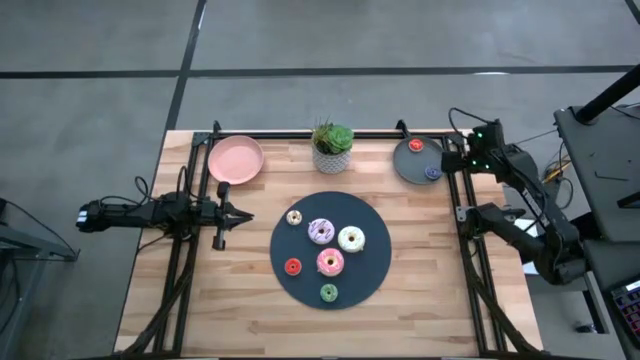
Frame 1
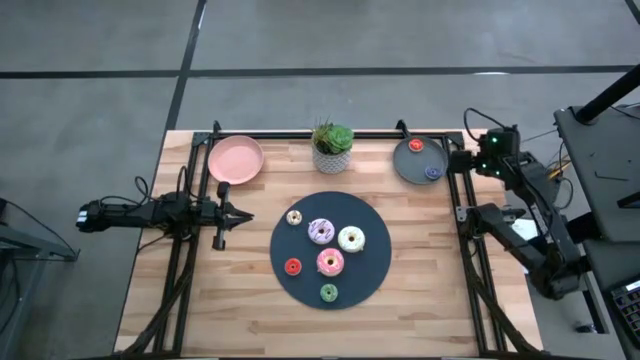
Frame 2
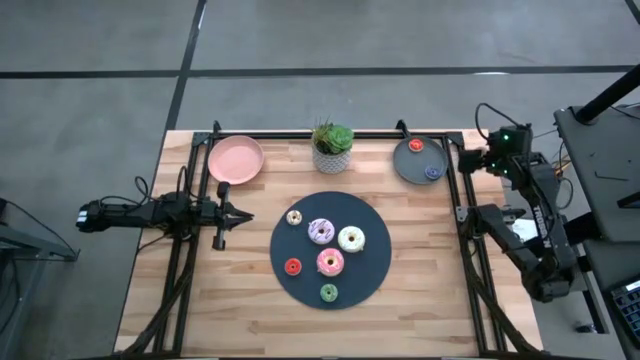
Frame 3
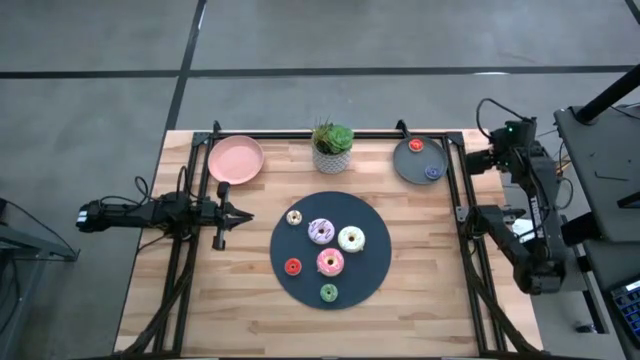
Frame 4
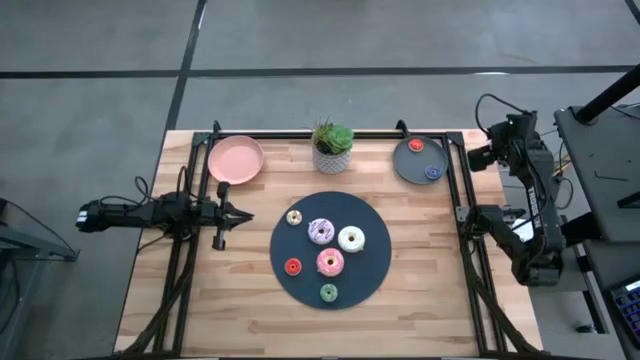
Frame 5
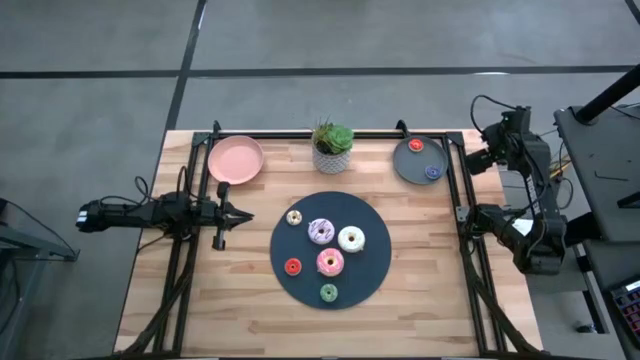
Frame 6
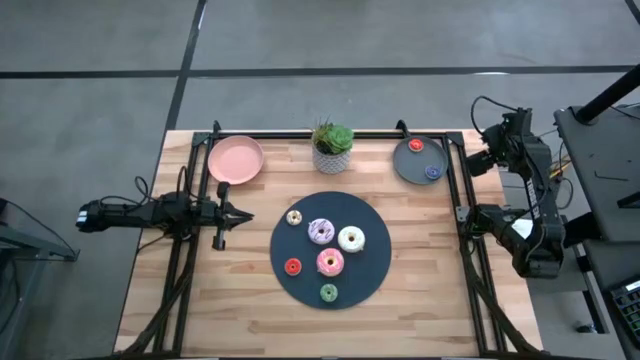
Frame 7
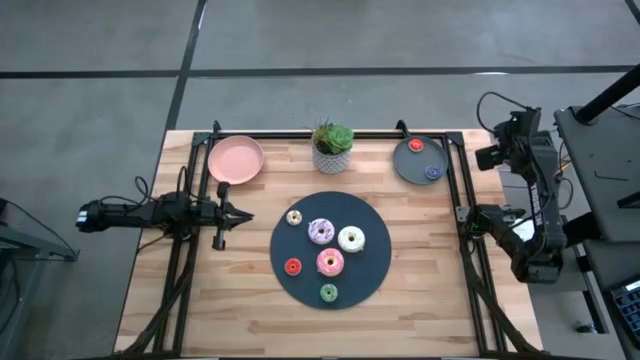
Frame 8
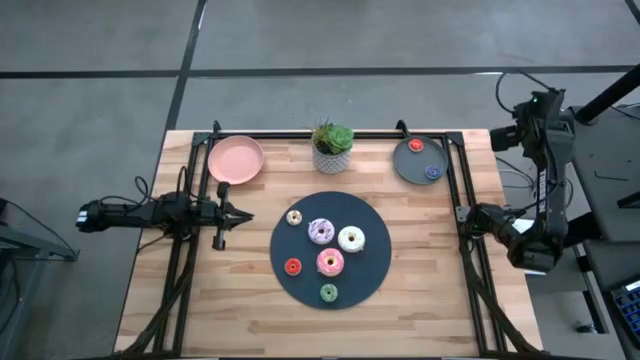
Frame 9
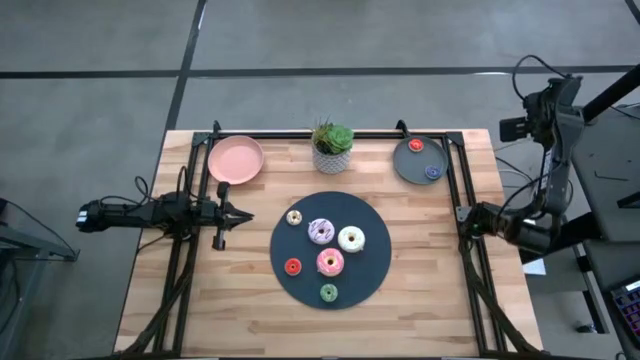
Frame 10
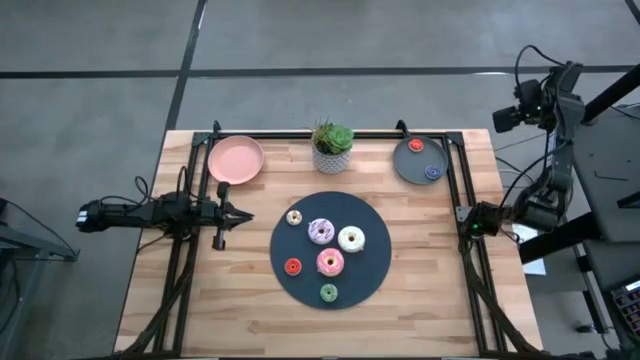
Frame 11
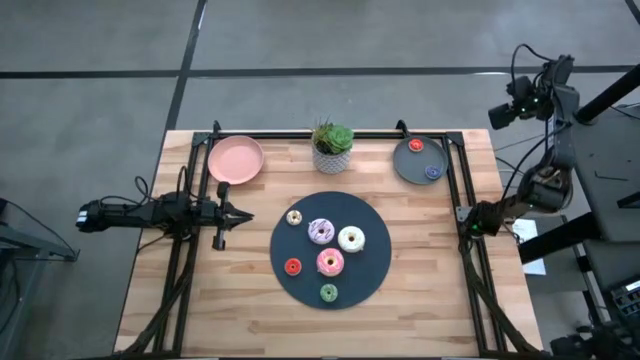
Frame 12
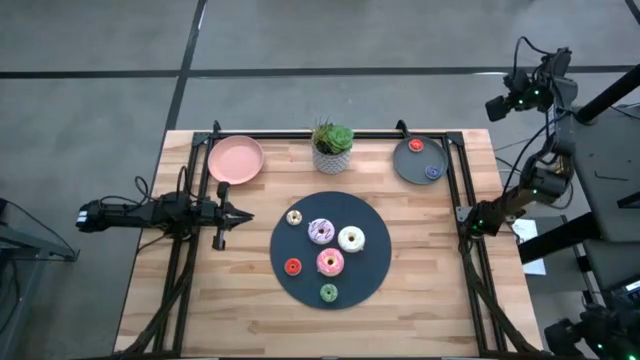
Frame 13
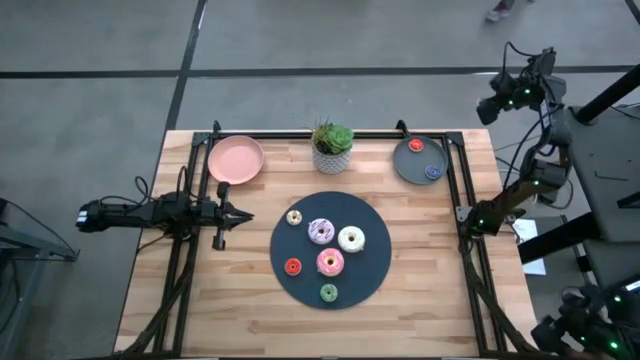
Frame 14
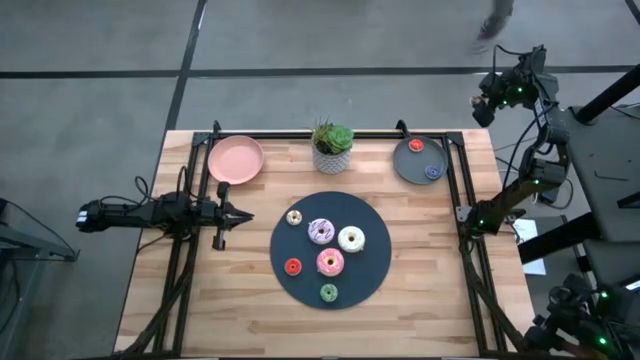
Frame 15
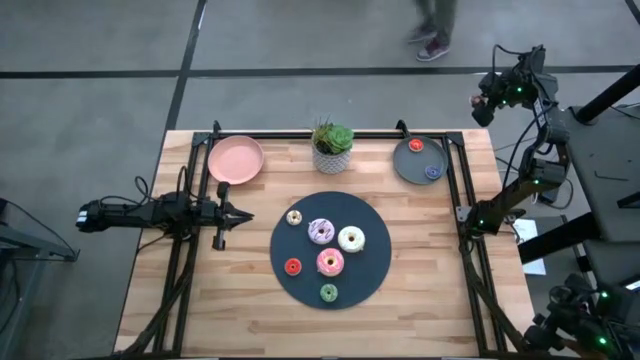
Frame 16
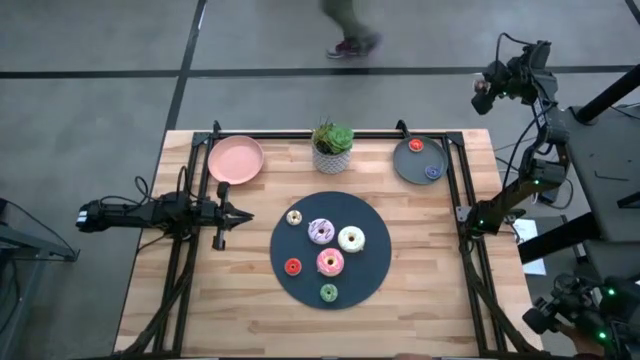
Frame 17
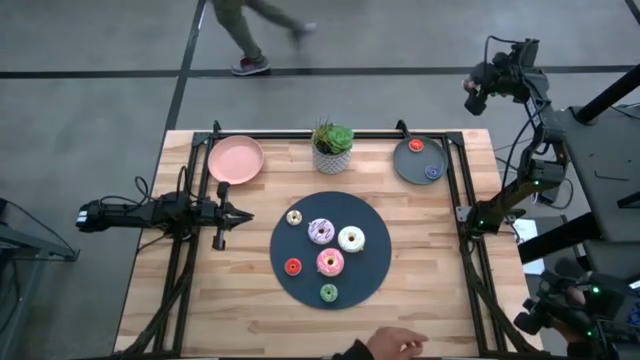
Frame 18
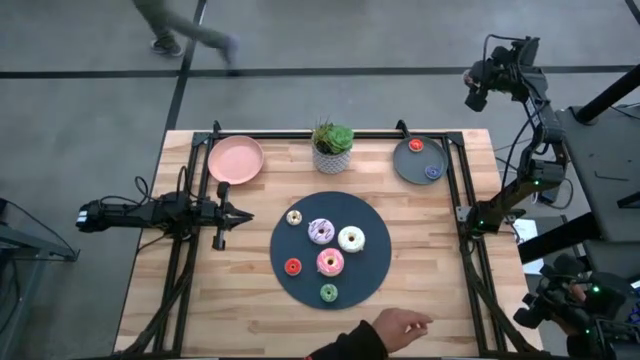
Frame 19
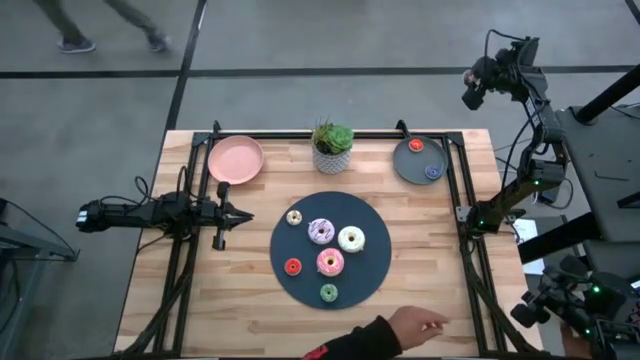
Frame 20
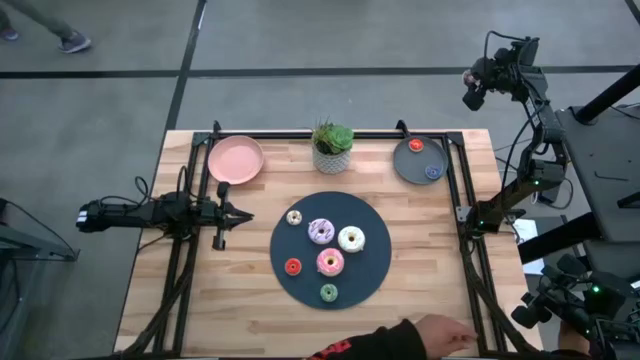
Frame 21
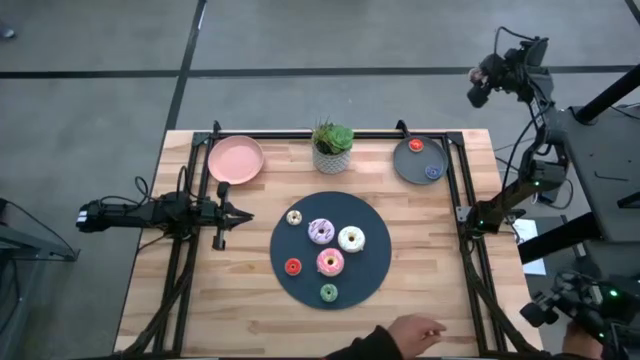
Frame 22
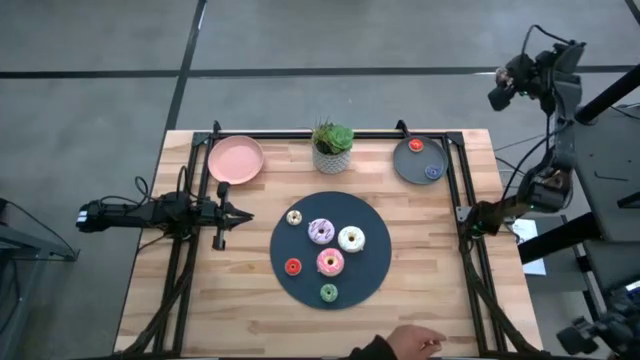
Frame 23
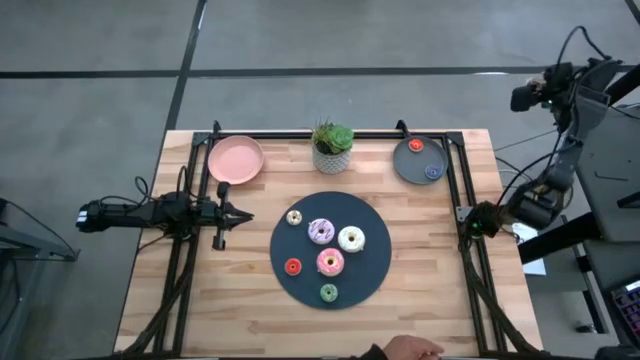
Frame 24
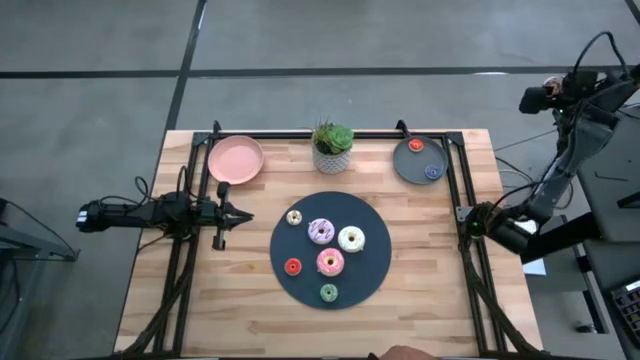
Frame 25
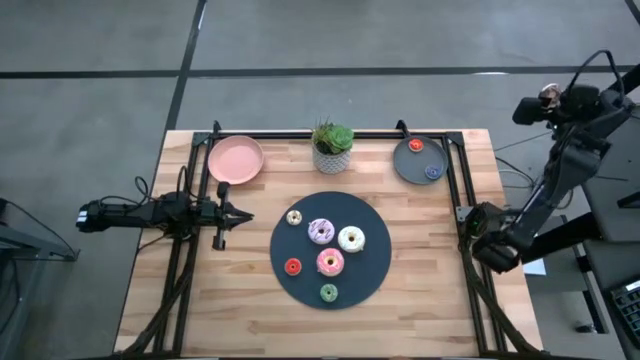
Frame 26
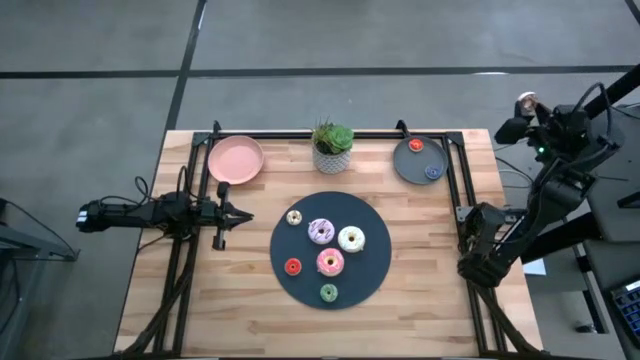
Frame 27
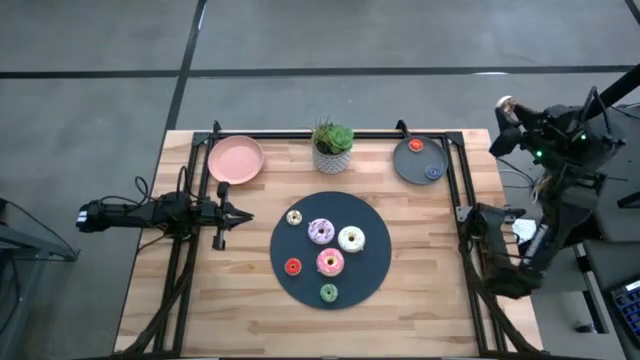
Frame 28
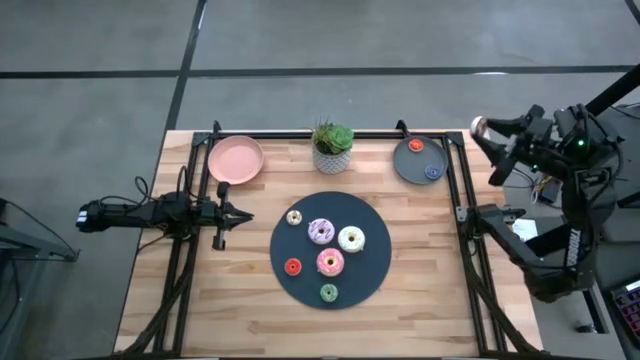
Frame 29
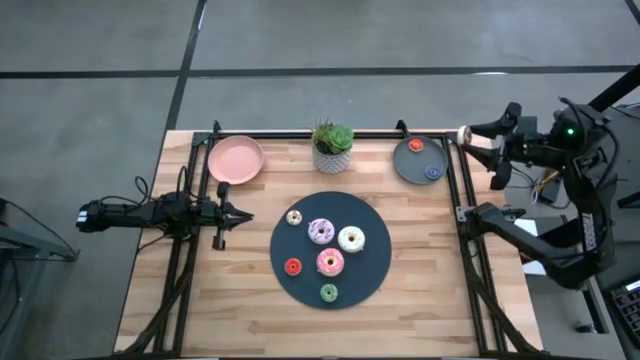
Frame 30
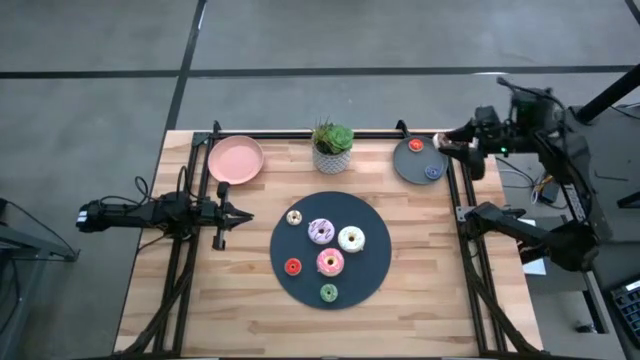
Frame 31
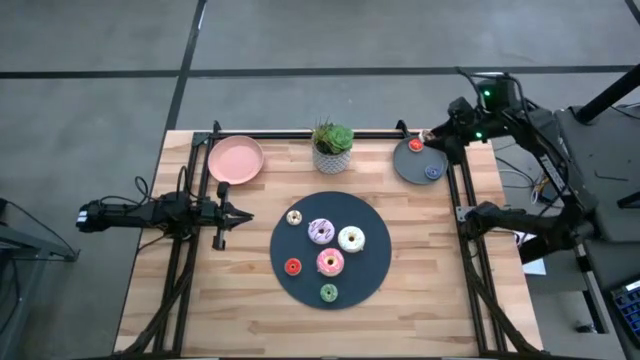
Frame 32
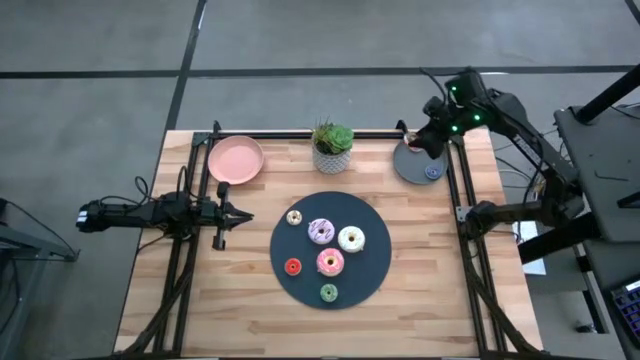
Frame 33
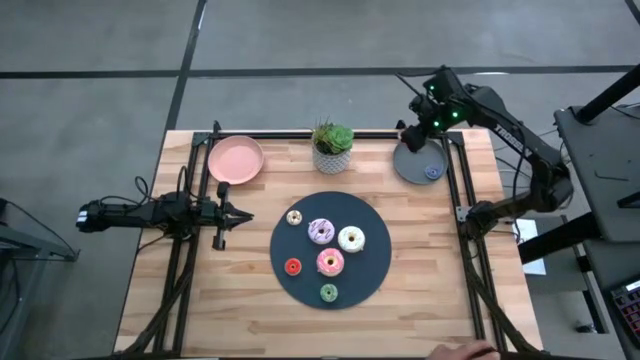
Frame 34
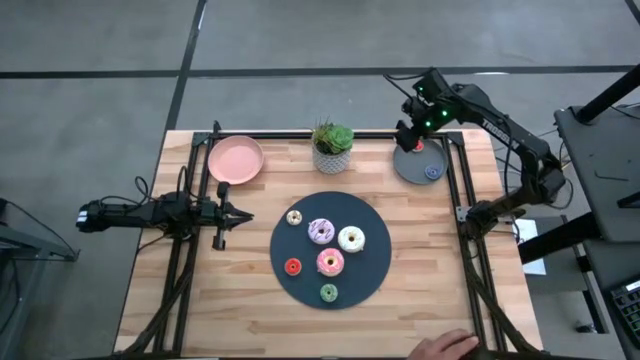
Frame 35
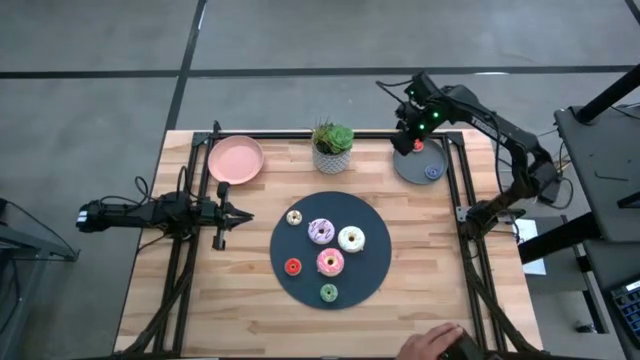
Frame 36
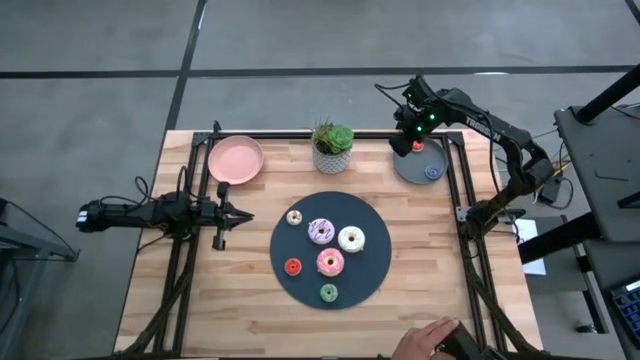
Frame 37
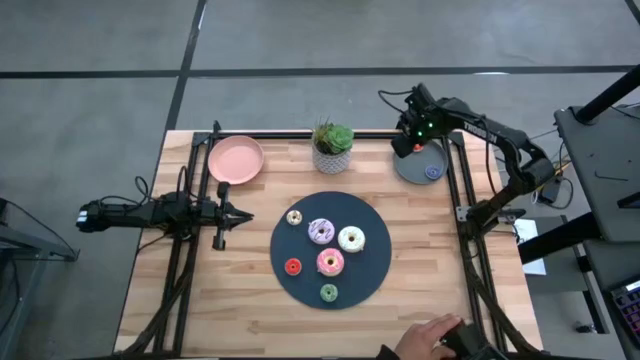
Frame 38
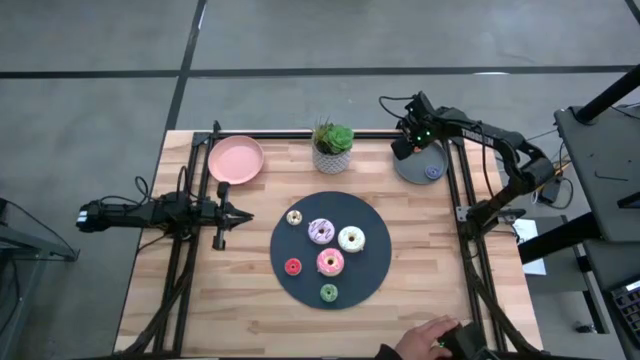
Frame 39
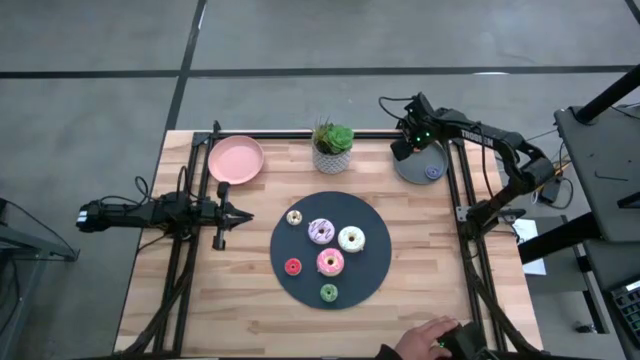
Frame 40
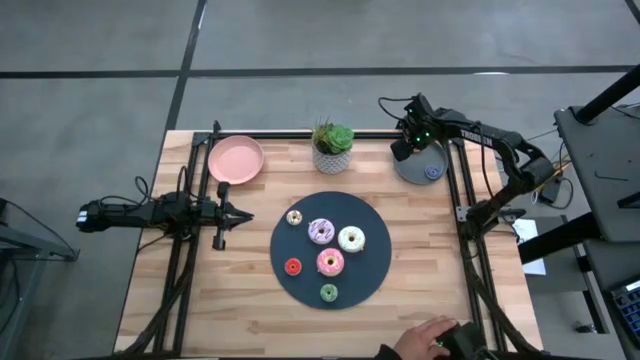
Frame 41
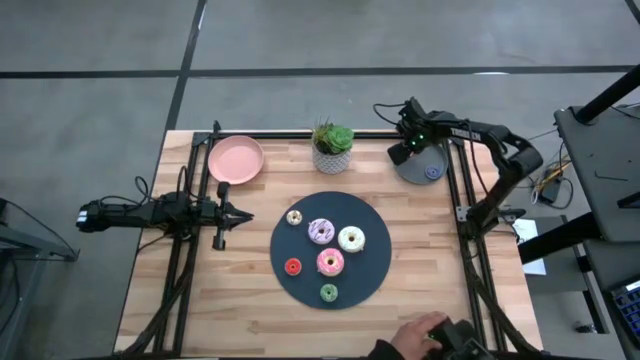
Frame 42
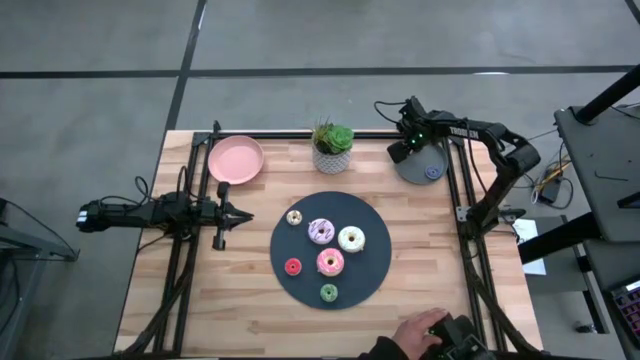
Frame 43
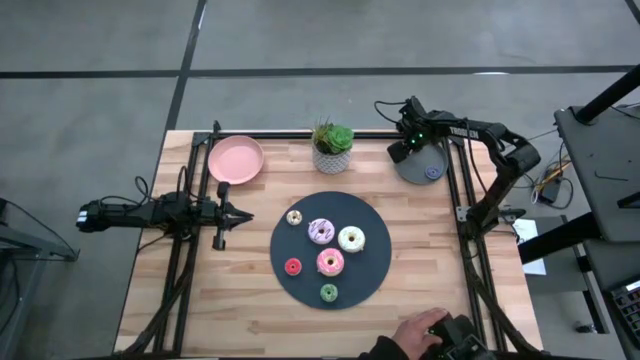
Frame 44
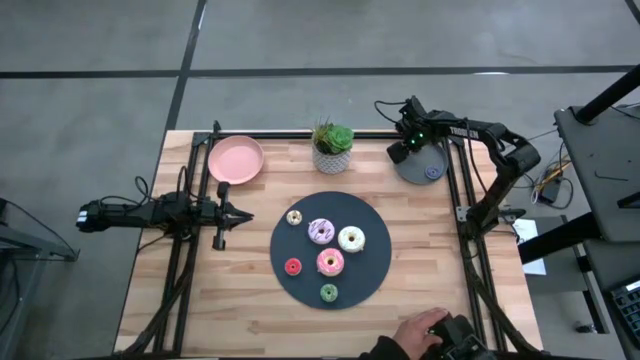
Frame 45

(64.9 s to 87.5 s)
Task: Pick & Place donuts
Put the small brown donut on the gray plate
